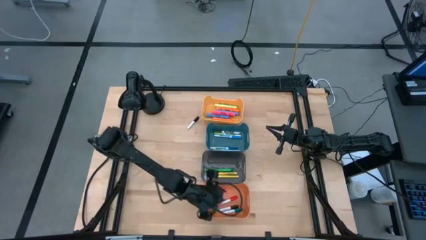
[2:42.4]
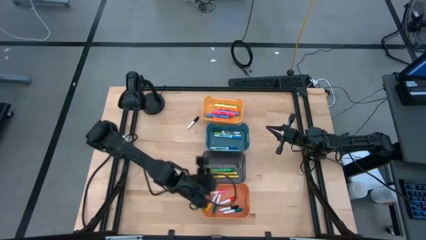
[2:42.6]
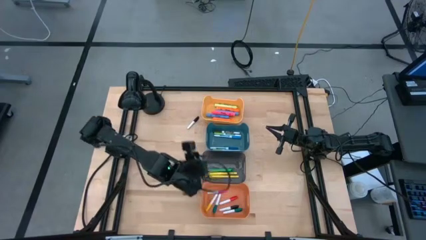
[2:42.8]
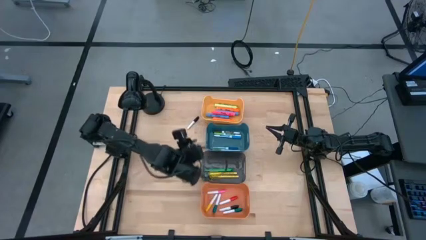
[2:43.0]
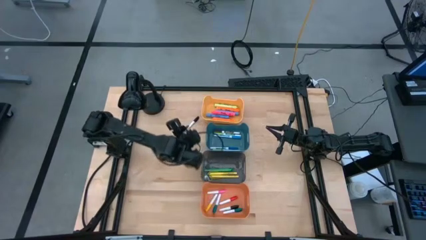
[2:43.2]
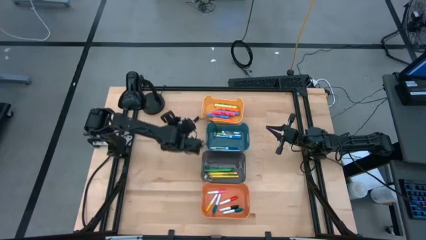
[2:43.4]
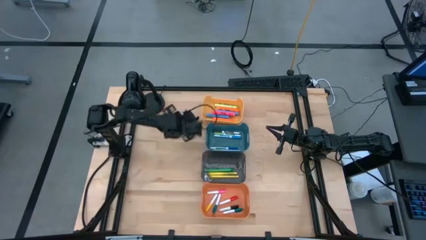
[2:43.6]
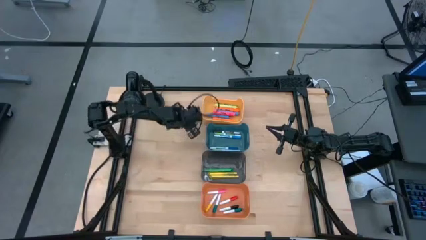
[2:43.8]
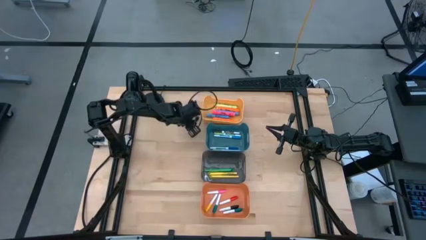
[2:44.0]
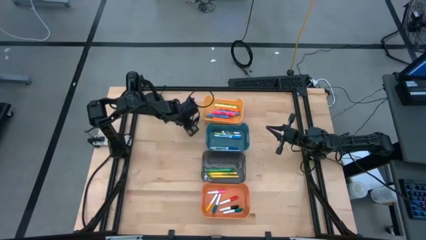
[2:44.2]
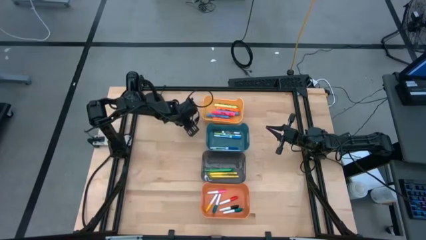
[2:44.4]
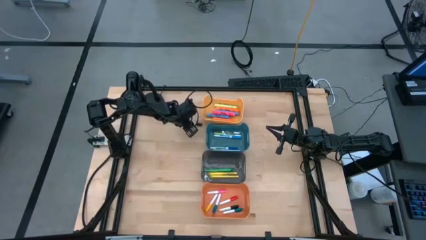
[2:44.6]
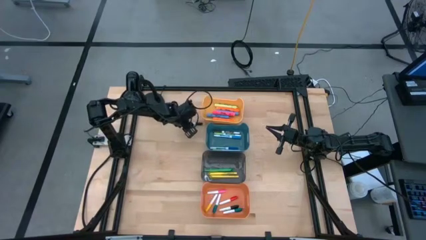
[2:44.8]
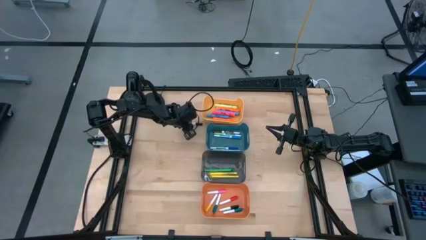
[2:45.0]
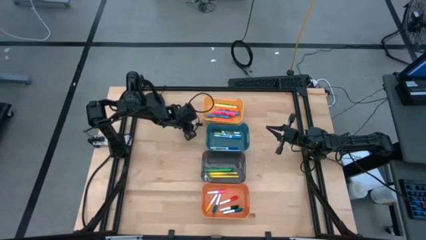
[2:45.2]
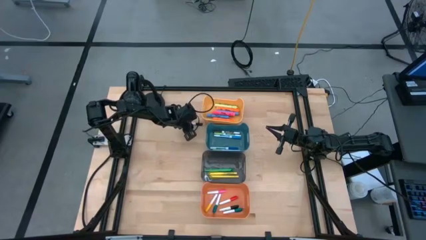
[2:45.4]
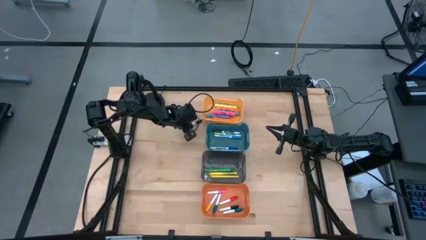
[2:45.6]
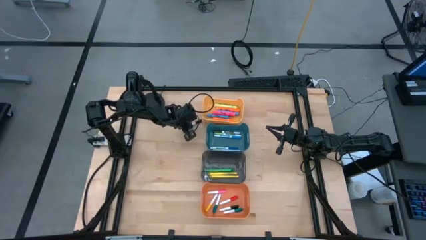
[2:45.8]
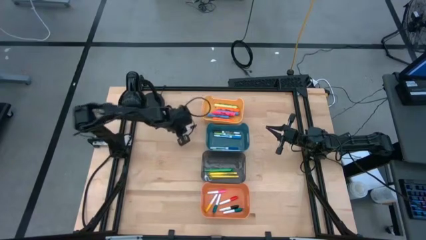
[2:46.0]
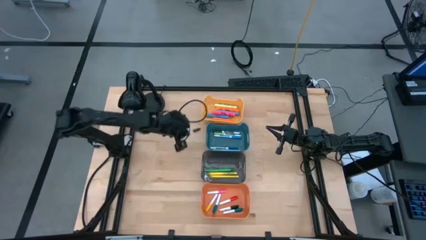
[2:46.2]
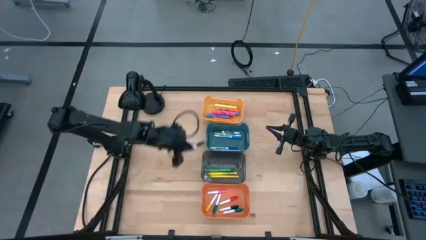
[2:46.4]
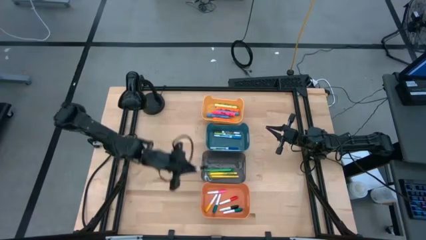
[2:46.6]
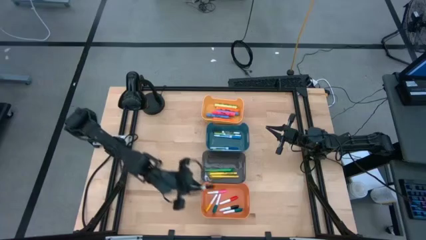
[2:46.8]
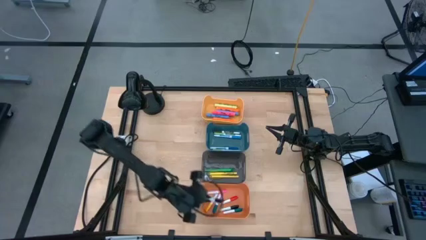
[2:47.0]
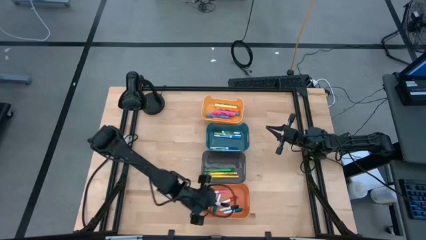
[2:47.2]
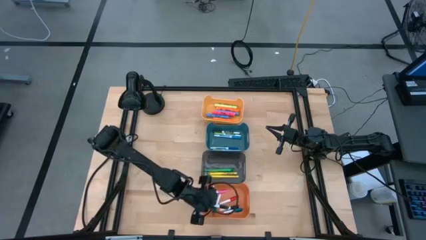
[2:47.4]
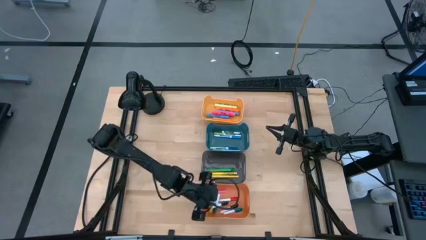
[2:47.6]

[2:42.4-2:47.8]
Task: Pick & Place Markers
Put the black mini marker into the orange bin

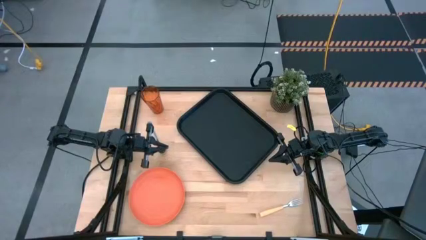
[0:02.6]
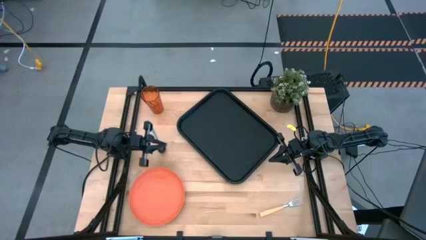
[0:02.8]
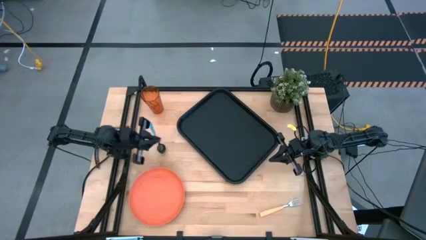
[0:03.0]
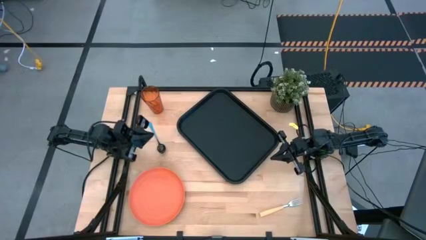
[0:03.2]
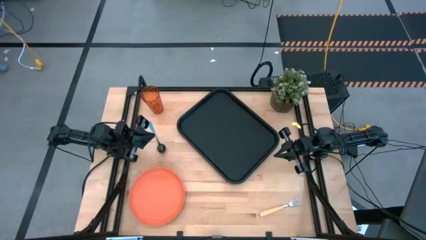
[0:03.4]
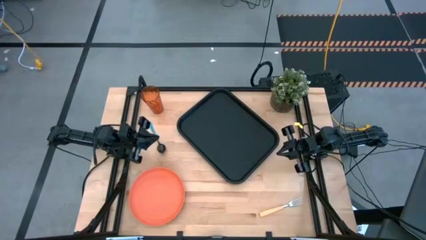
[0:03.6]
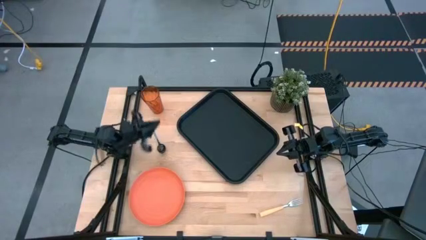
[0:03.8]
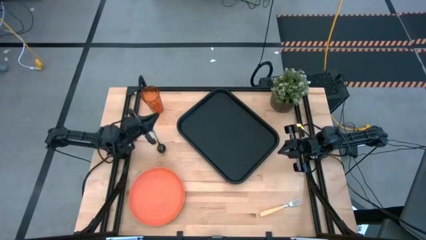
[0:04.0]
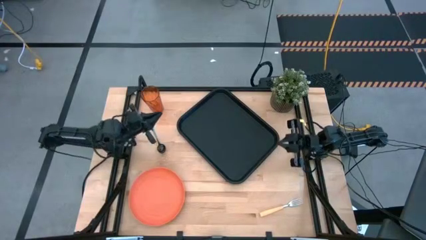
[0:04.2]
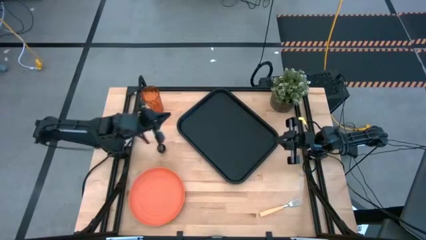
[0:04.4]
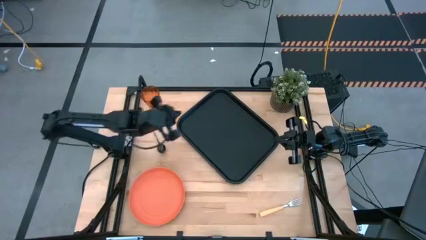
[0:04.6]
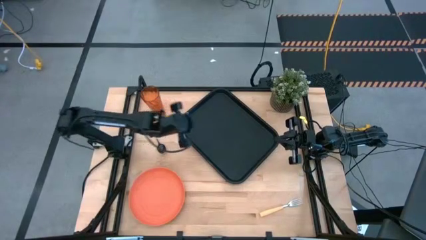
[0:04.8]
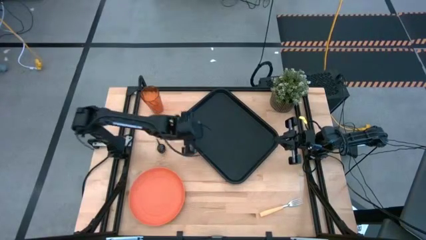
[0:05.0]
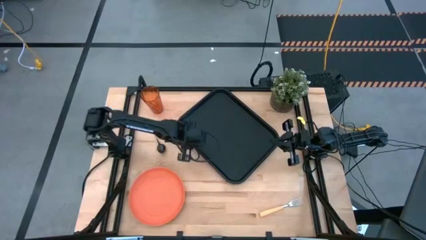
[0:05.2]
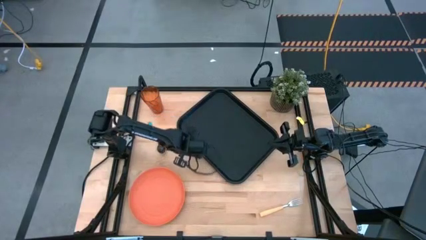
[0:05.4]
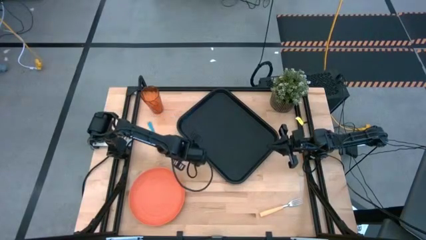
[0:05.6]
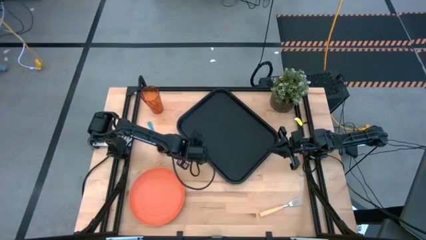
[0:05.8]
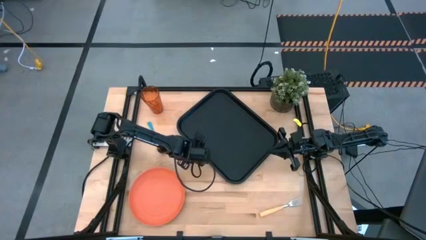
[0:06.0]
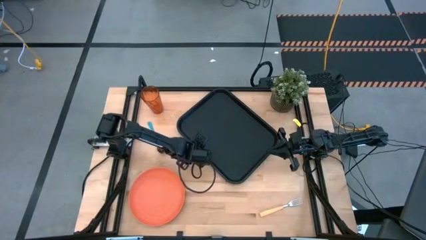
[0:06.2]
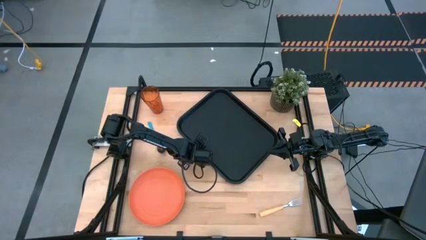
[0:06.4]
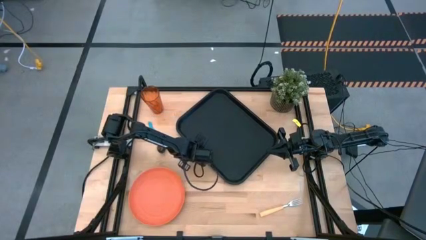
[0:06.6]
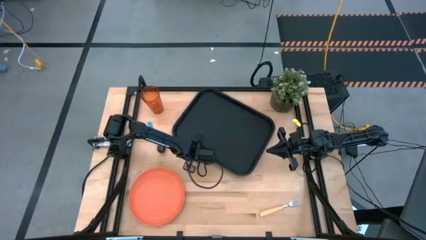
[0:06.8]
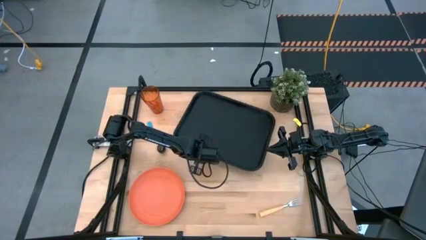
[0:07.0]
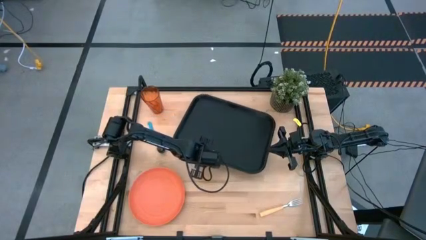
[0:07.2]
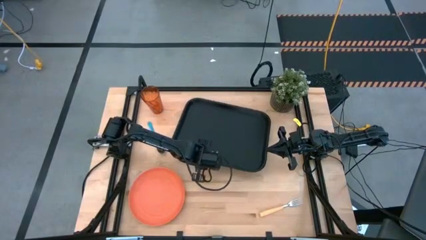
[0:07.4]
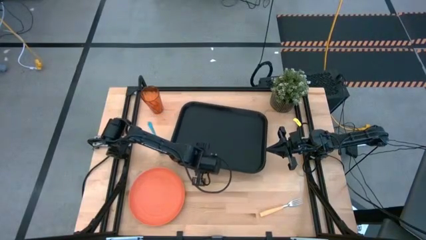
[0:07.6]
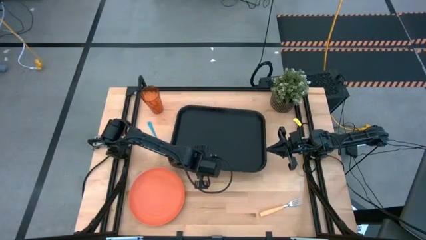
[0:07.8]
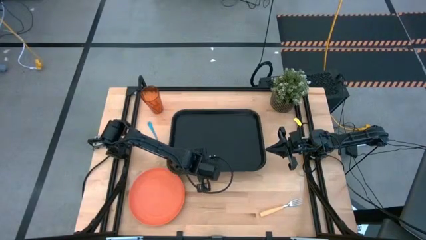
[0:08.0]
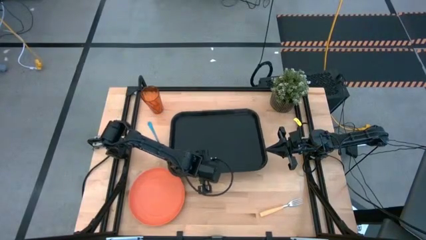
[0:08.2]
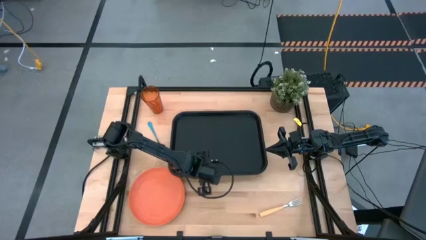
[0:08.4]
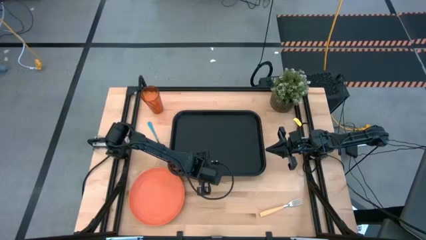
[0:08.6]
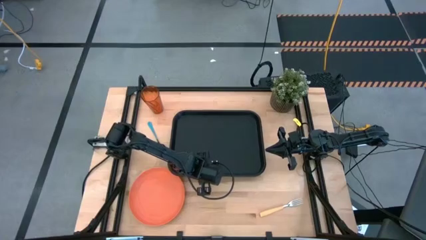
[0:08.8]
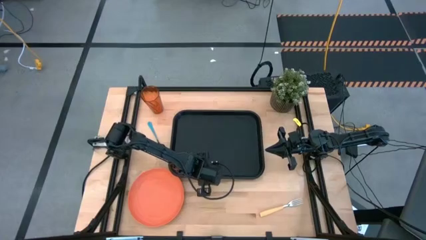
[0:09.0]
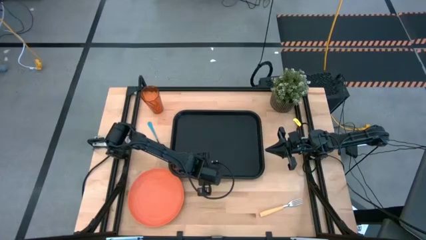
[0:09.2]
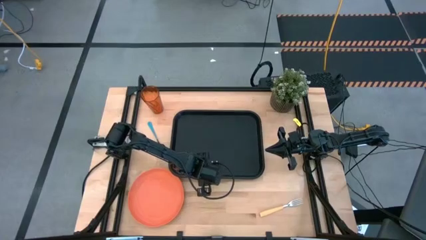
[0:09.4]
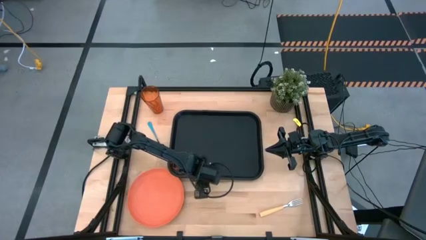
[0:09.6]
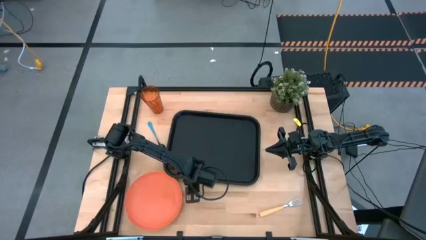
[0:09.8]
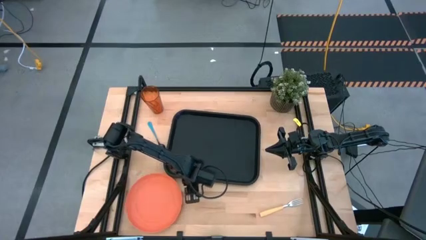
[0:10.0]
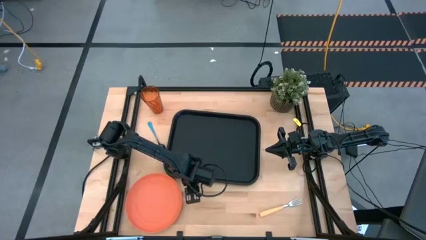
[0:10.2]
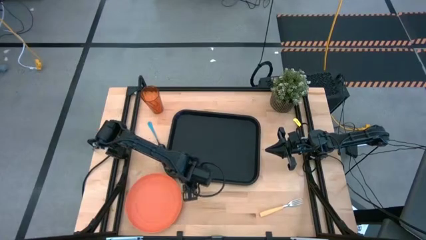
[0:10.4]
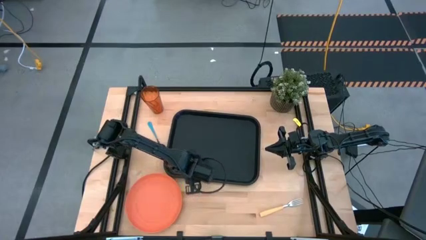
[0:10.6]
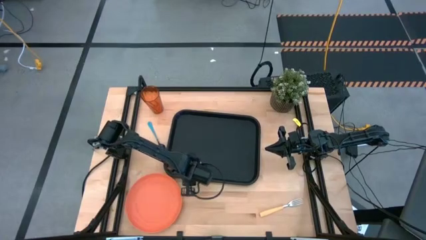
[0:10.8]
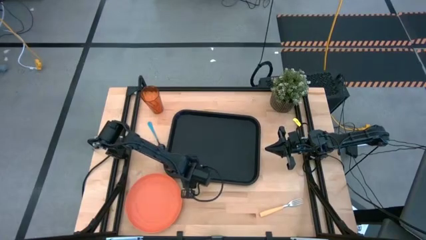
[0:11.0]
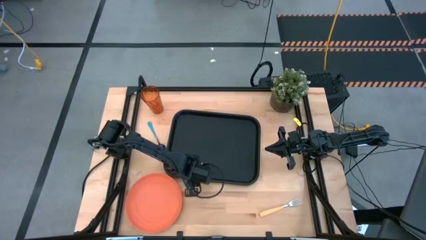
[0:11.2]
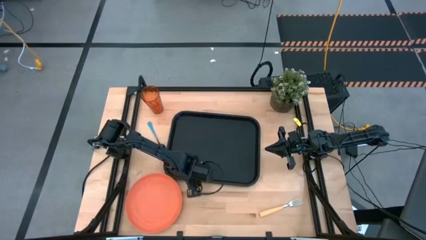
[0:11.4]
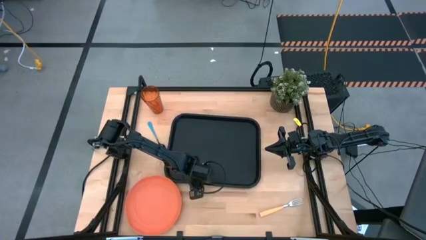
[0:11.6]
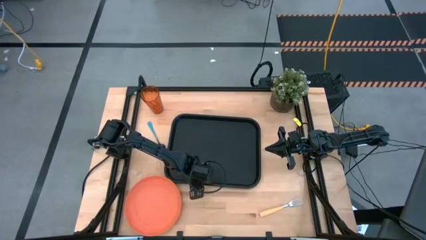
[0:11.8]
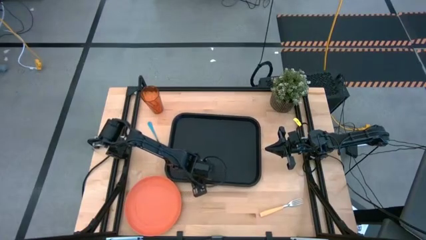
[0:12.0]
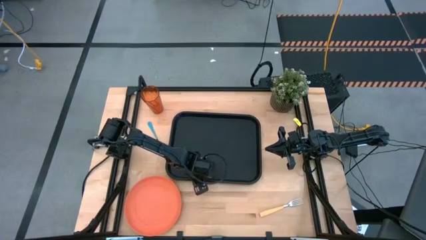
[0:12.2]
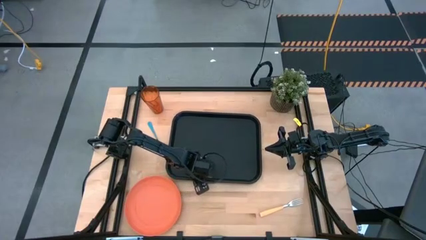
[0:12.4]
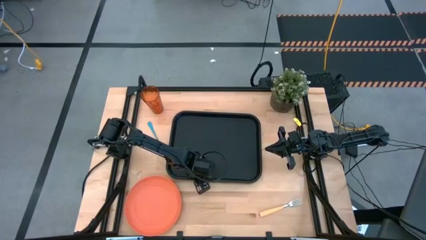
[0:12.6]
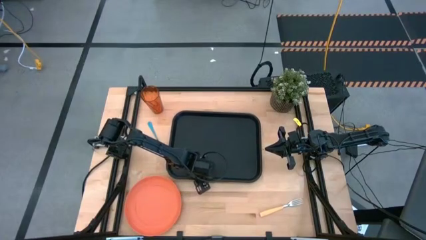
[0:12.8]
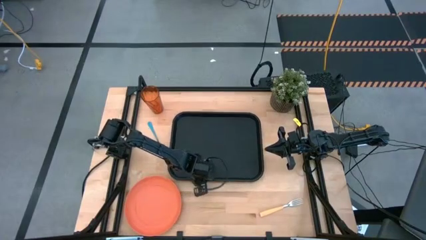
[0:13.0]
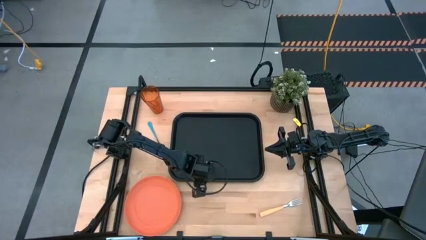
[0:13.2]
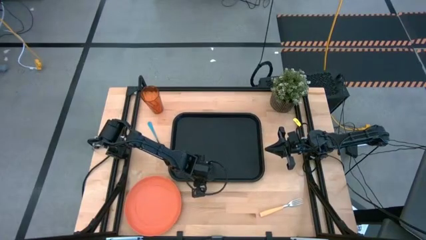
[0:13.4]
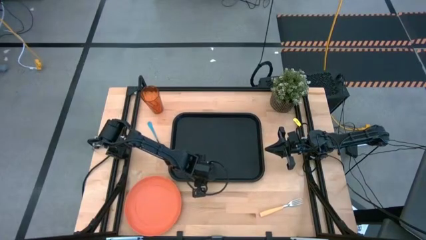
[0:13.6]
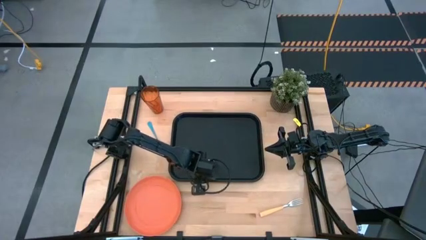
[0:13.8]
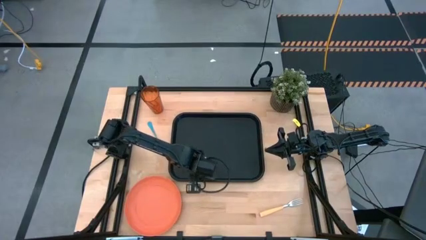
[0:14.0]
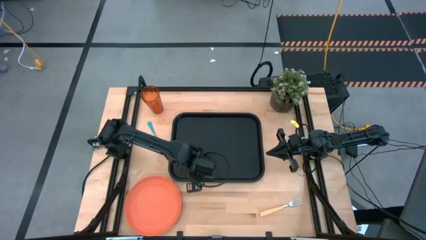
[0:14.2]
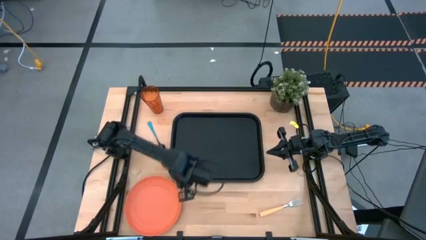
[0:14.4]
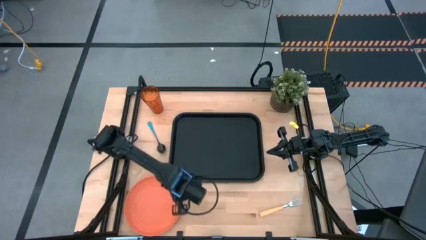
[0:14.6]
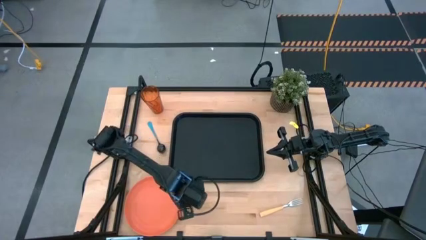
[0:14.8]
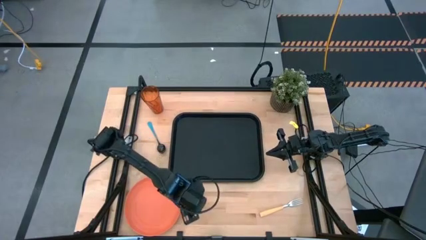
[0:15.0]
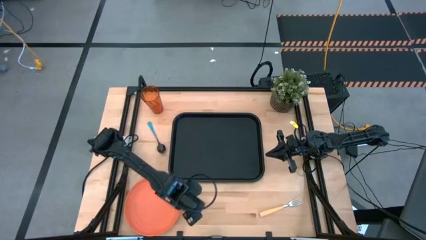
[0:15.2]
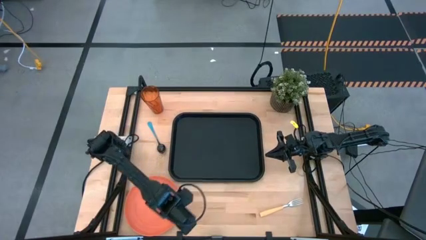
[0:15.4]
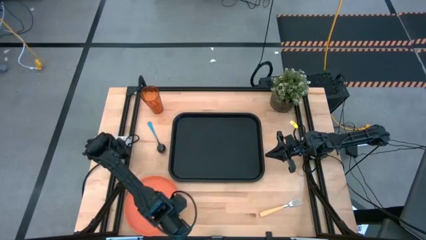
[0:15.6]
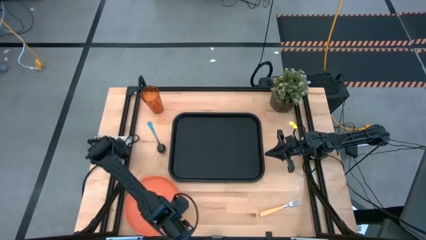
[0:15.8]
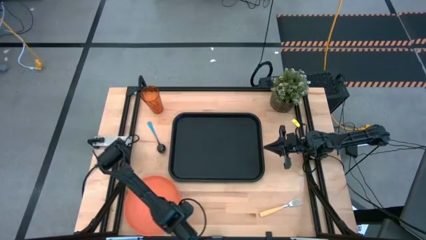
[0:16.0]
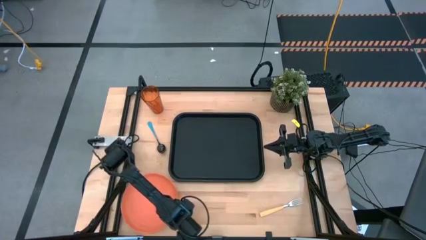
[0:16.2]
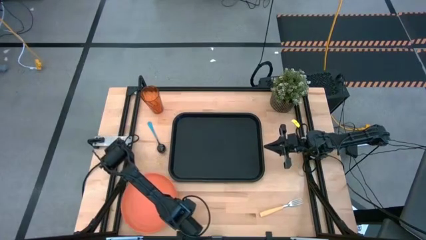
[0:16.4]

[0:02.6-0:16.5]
Task: Pick and place plate/cup/fork/spoon on tray
Adjust the black serving tray
